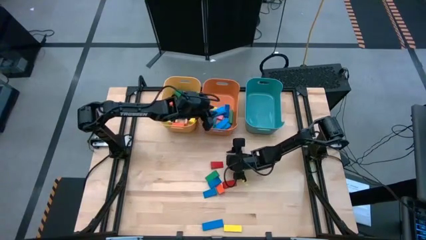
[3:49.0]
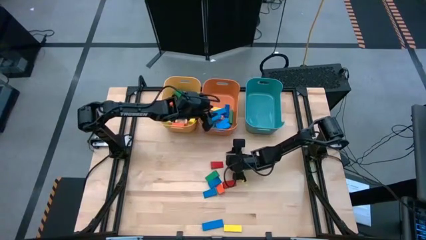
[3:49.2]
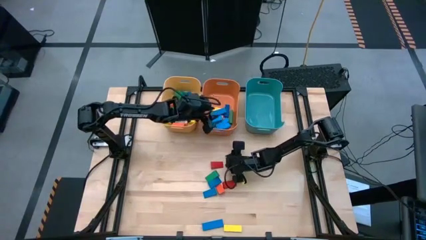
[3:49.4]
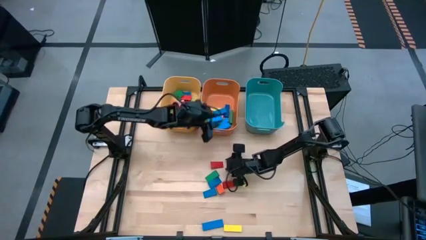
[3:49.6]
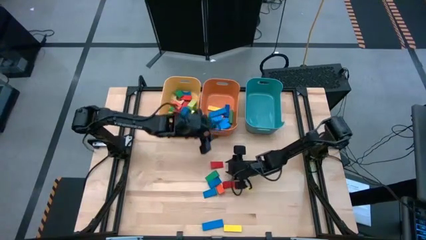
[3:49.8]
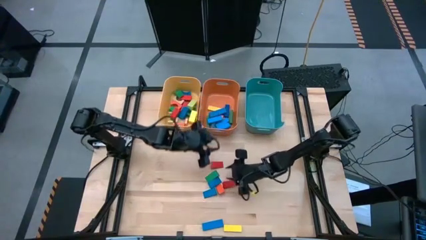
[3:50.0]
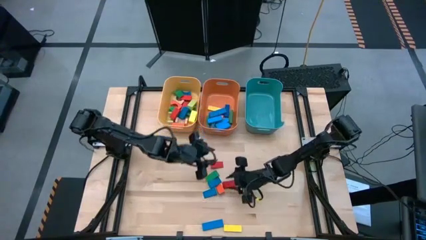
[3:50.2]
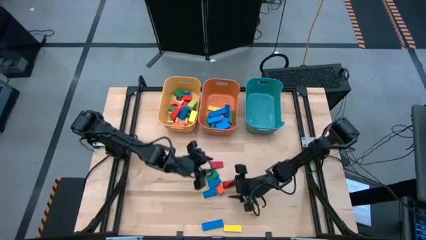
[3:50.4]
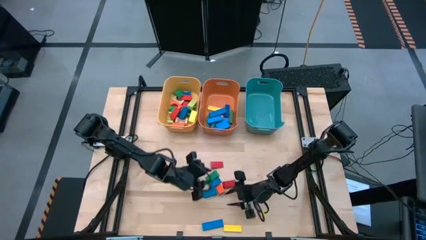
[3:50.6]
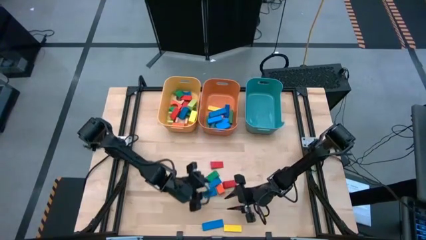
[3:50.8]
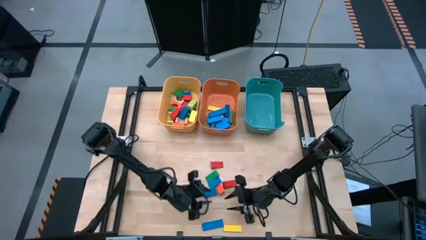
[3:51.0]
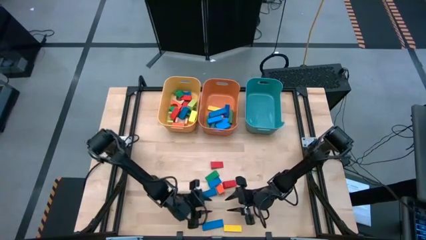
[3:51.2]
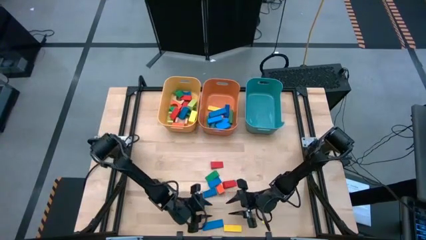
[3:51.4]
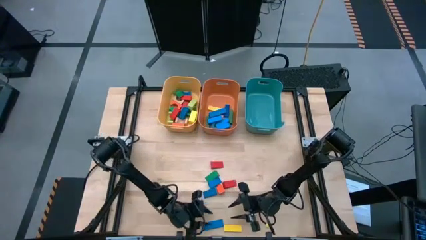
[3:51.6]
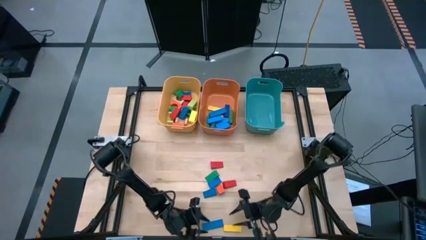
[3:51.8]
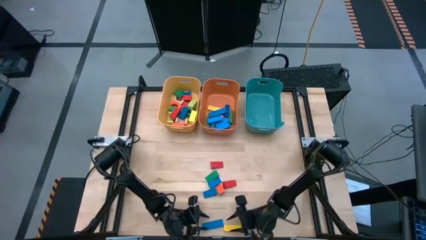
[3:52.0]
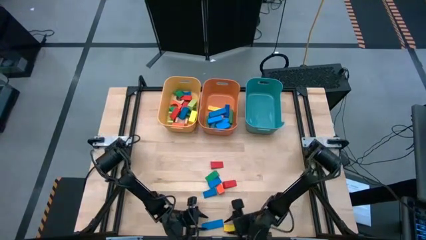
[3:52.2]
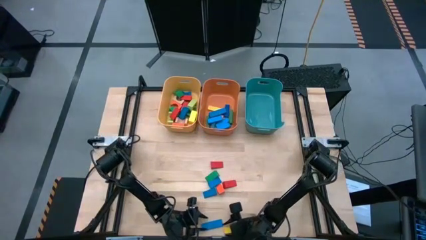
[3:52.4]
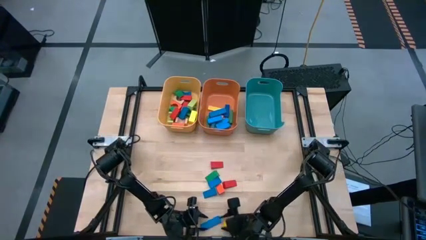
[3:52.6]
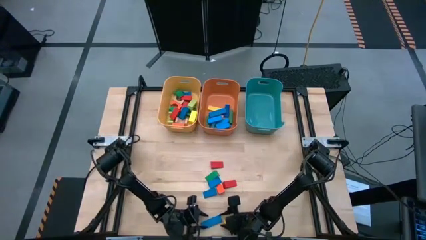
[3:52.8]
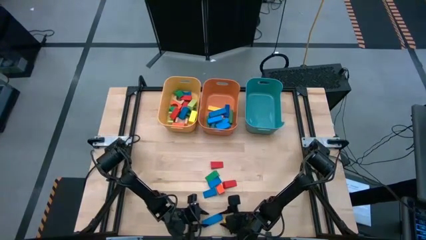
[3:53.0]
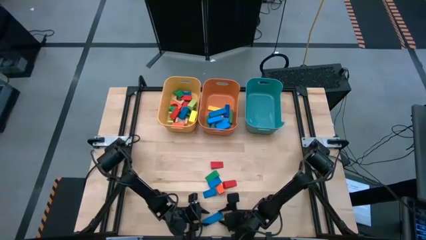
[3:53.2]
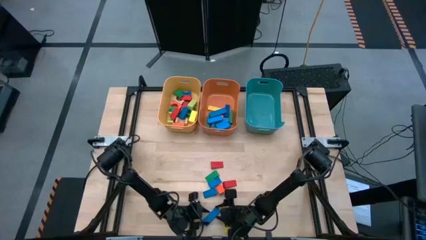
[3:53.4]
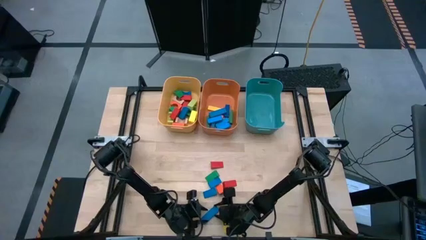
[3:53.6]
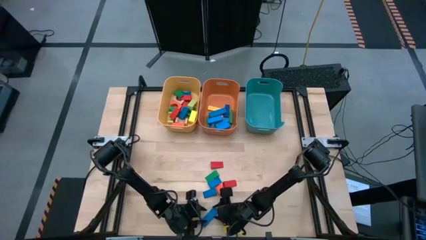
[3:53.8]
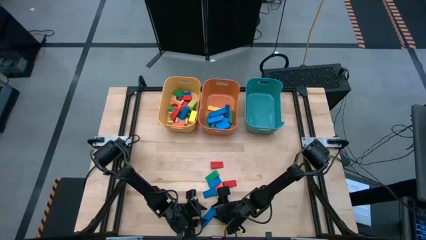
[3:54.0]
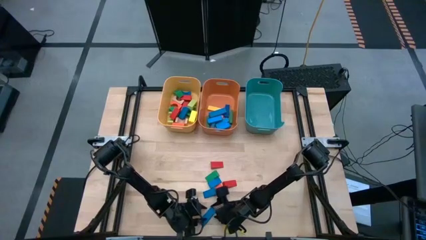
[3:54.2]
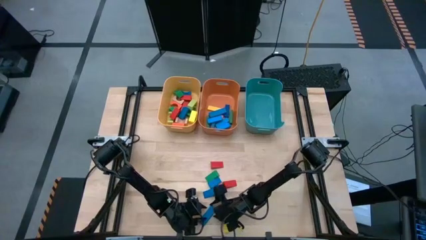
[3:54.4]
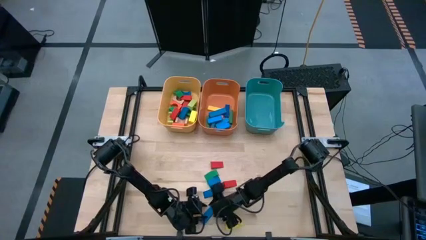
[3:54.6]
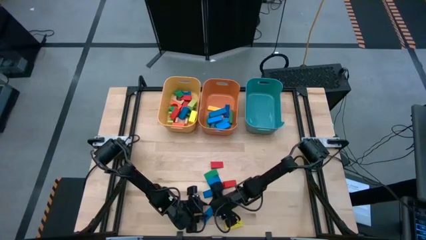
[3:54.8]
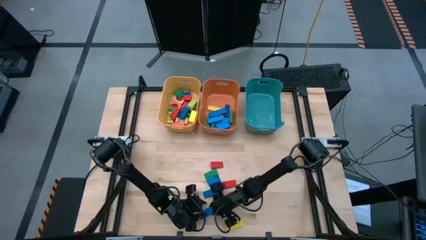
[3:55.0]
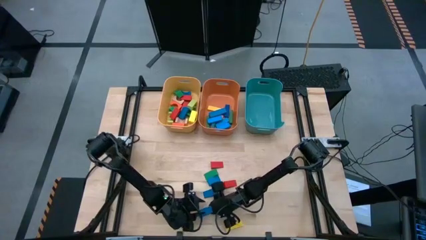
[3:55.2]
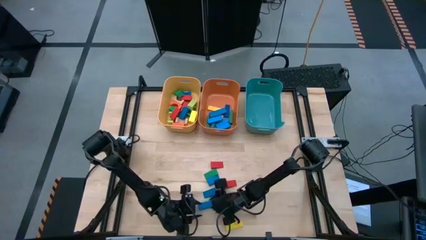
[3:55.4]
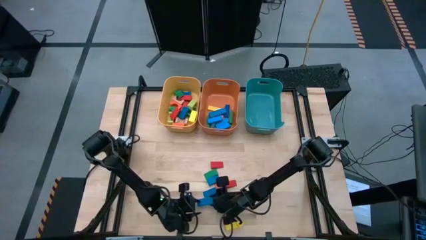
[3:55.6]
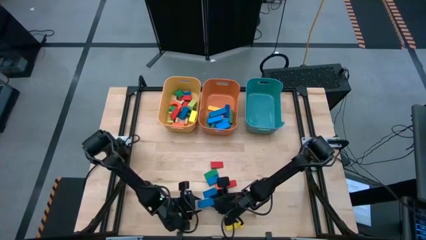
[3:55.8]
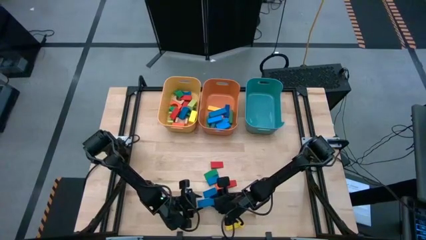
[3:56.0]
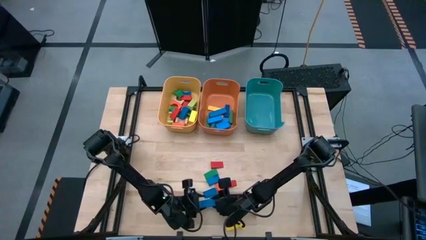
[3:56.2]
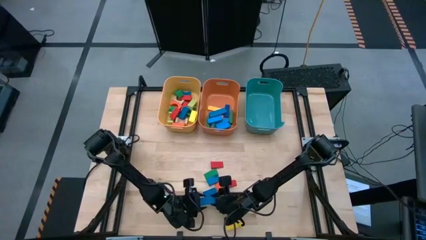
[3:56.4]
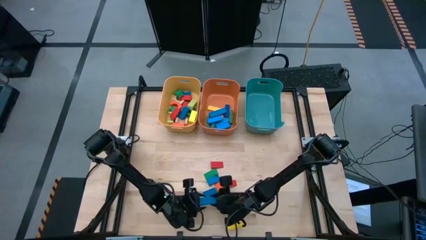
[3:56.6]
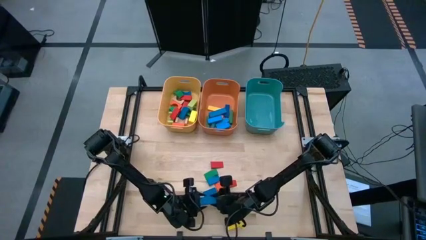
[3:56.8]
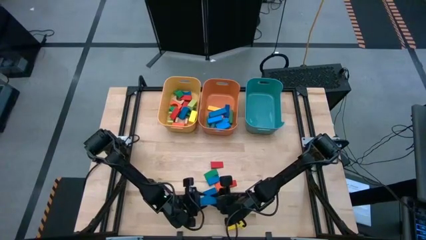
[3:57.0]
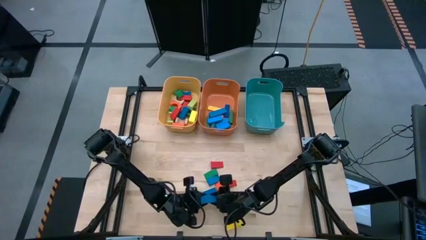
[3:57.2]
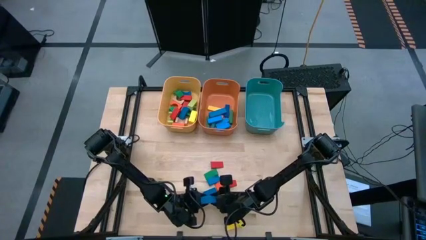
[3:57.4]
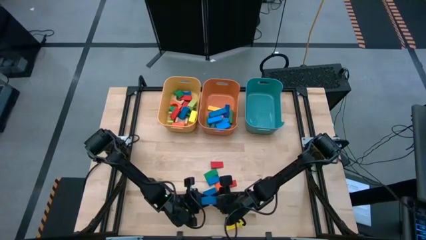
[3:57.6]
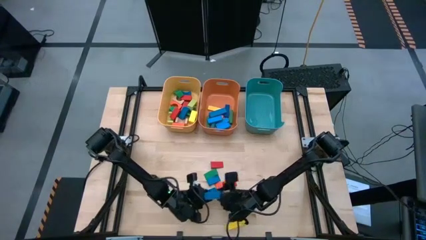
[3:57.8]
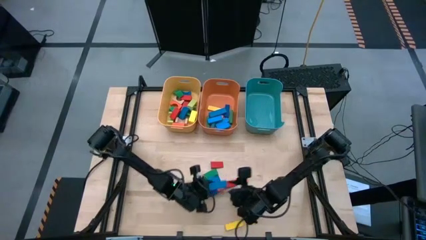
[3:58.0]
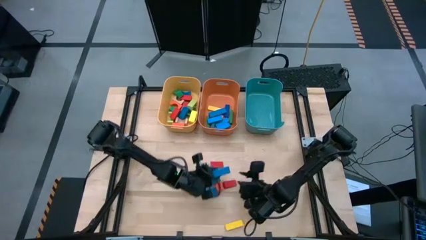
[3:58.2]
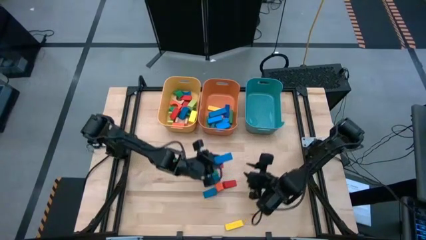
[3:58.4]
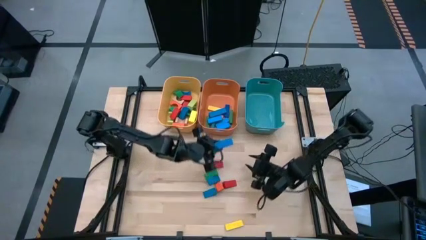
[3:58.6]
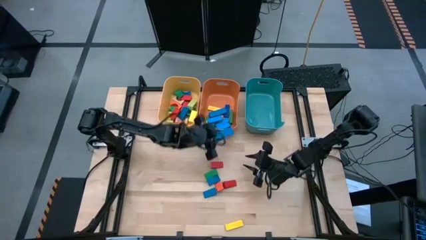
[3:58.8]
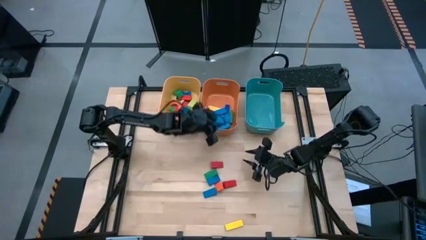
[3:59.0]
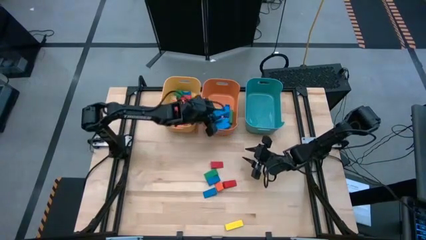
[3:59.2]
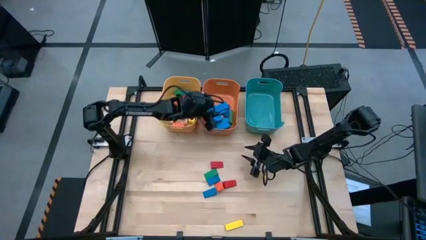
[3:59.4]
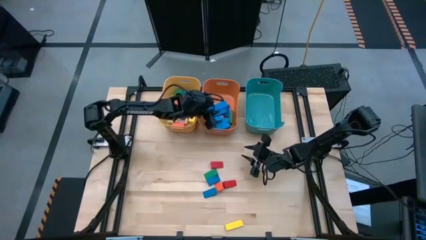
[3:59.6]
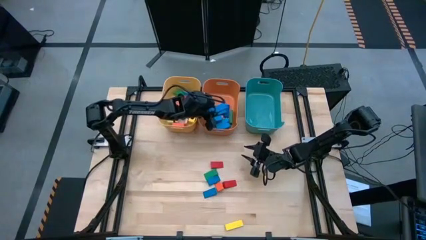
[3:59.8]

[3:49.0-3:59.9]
Task: Sort blocks by size
Put the blue rectangle block into the orange bin

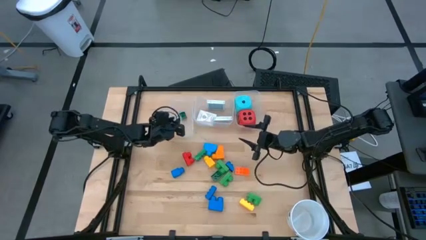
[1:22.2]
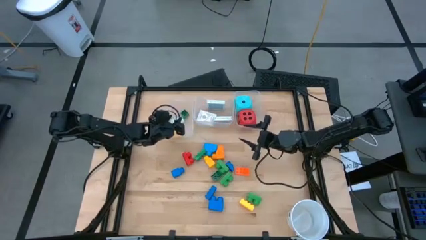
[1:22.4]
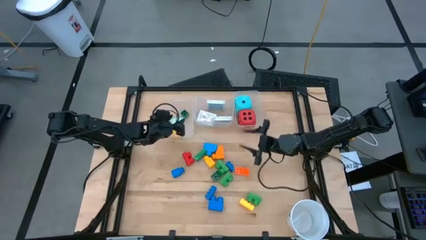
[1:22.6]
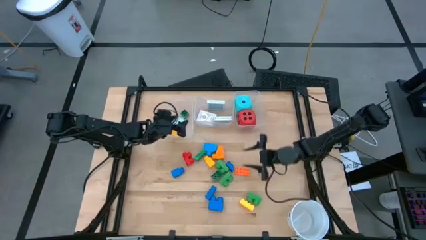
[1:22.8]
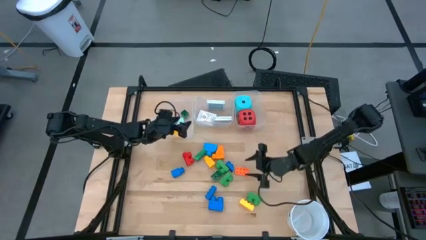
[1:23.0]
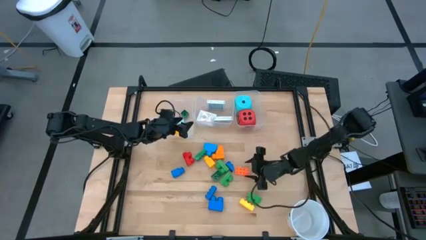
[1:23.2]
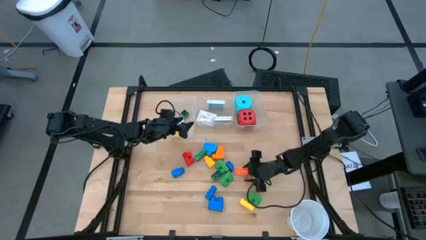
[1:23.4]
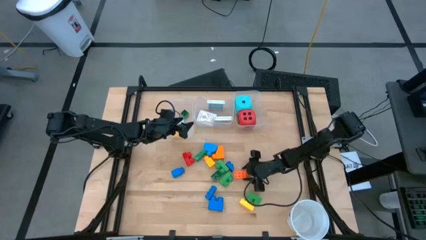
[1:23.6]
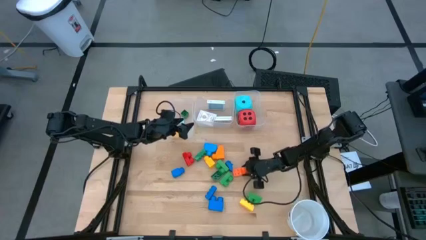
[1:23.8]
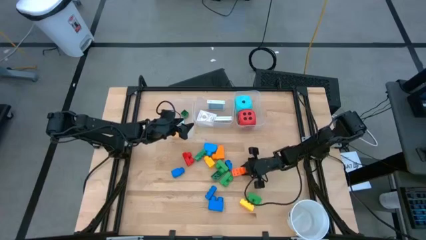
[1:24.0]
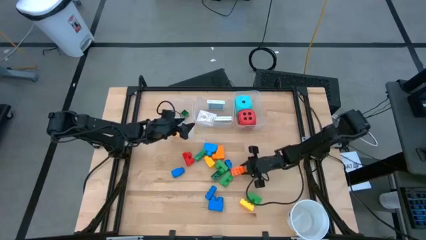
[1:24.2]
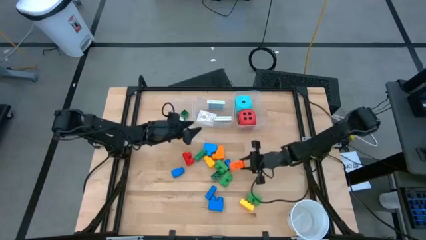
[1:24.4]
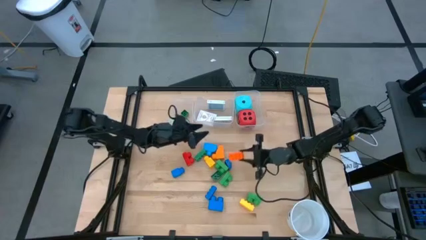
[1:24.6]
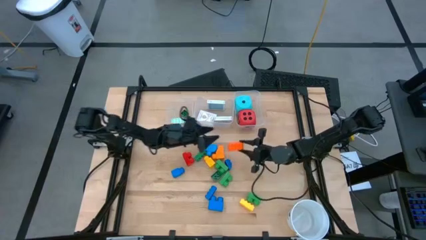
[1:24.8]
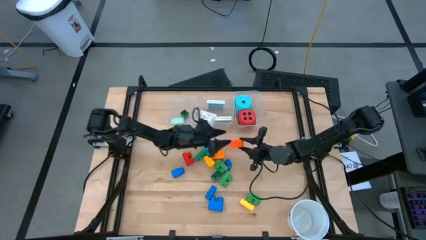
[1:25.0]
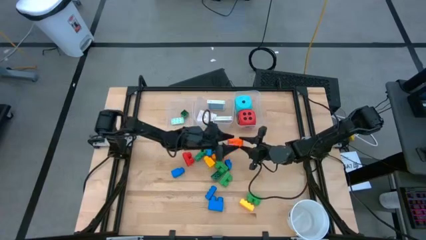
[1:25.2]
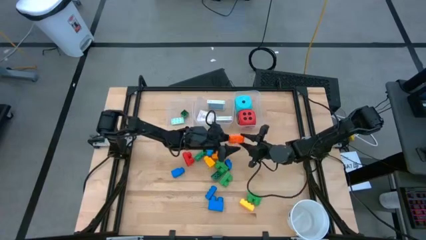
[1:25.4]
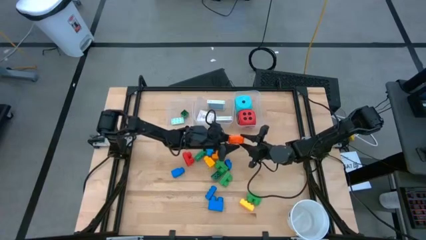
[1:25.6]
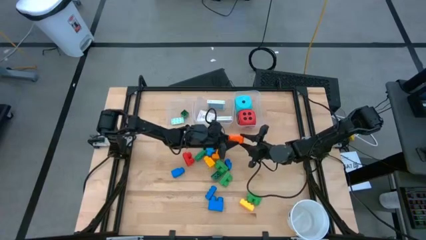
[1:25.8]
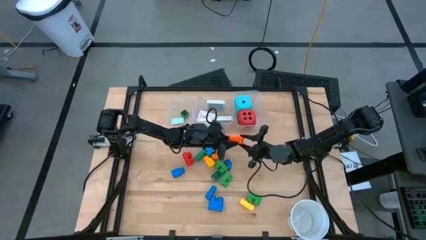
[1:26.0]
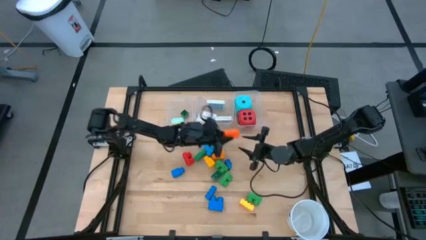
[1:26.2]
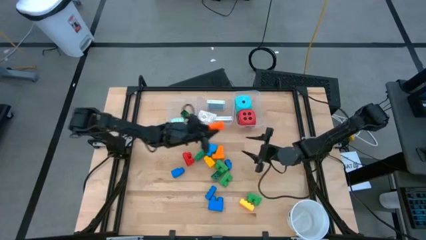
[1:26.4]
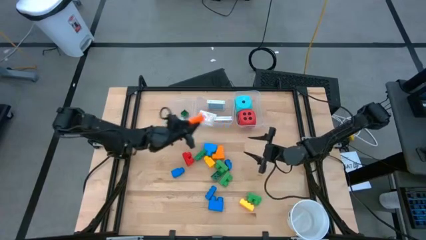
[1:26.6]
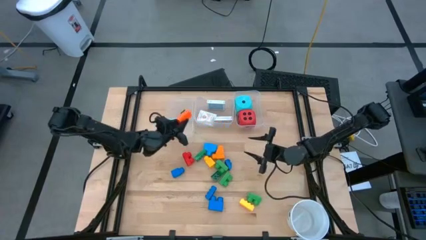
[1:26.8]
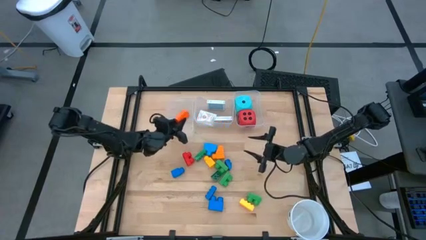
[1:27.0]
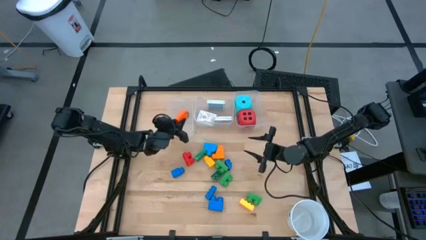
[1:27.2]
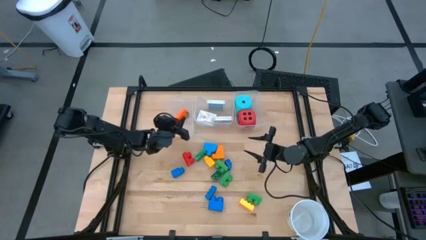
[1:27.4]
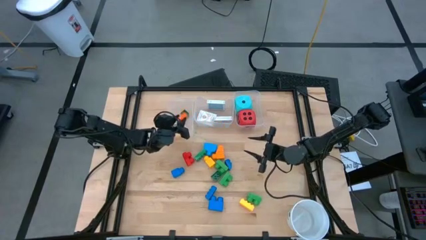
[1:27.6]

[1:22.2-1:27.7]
Task: Pick & Place Toys
Put the orange game piece into the left transparent bin

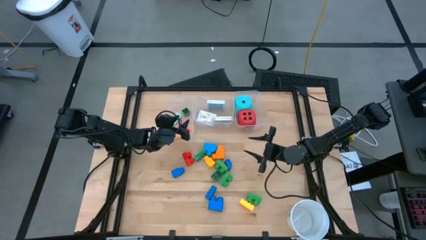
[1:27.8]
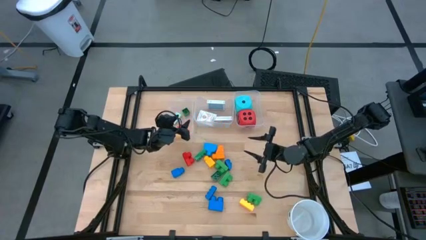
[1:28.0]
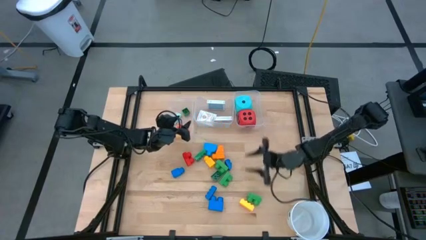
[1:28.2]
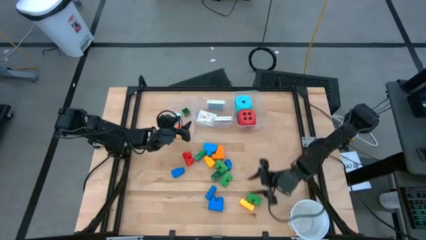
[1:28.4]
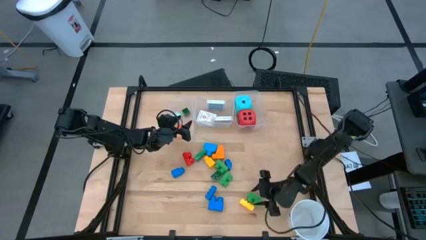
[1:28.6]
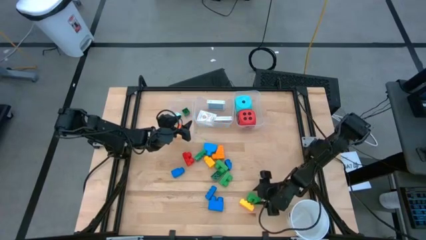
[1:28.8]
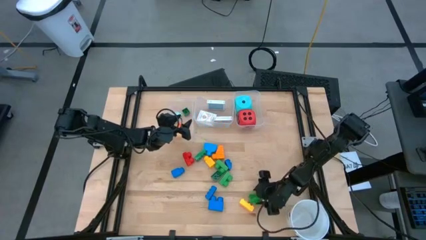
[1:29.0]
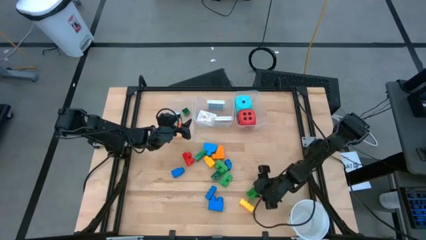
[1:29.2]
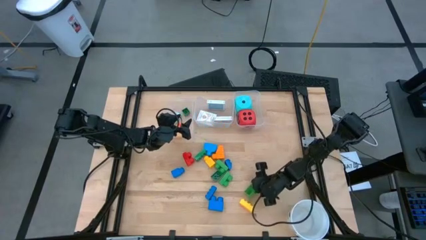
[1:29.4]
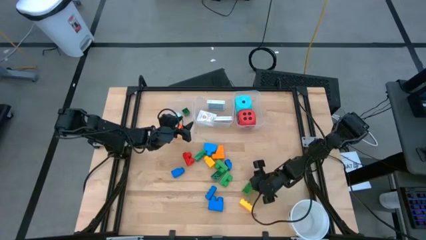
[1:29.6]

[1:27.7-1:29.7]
Put the green game piece into the left transparent bin
